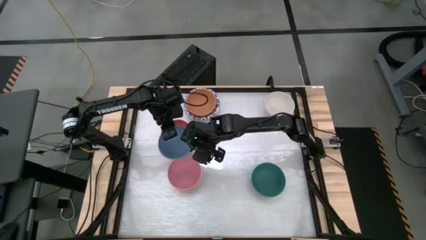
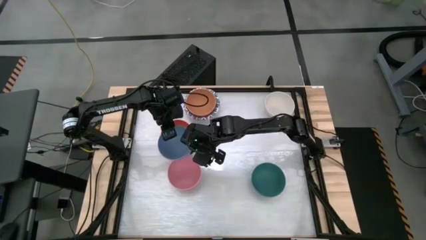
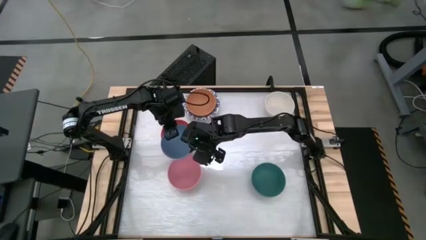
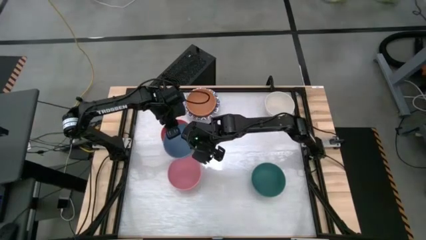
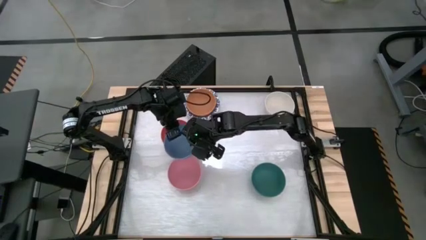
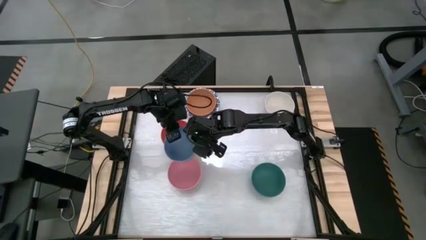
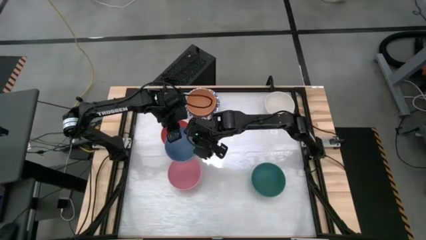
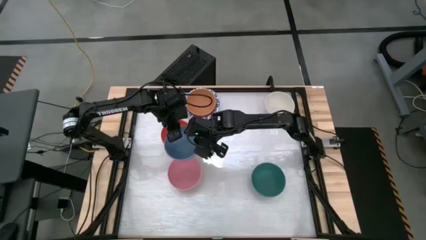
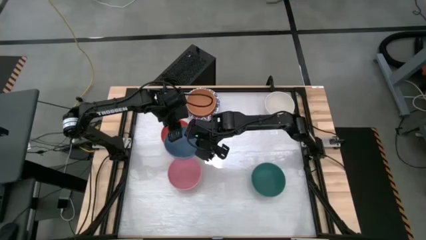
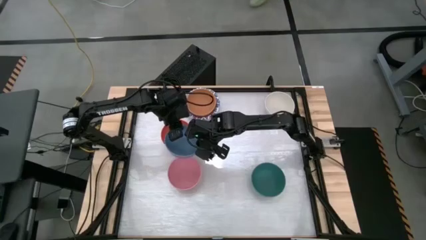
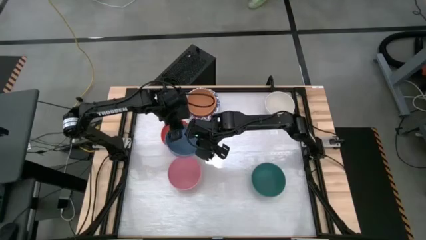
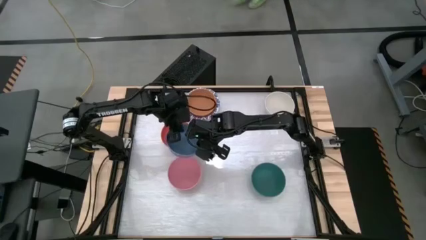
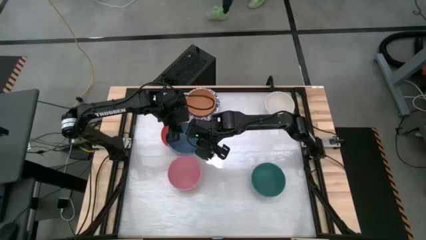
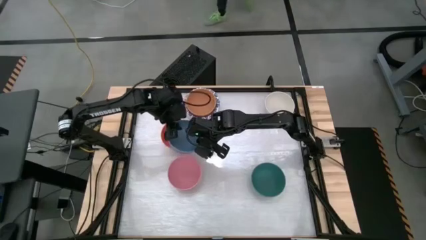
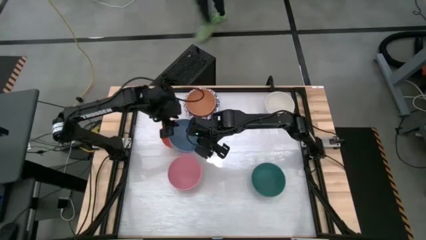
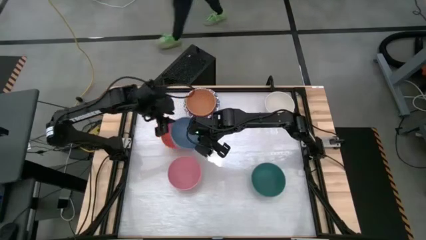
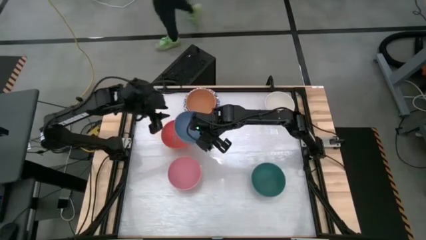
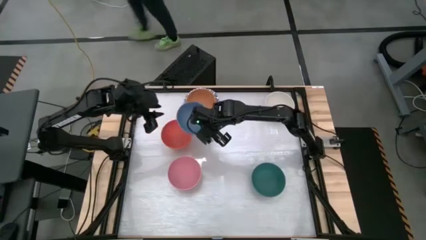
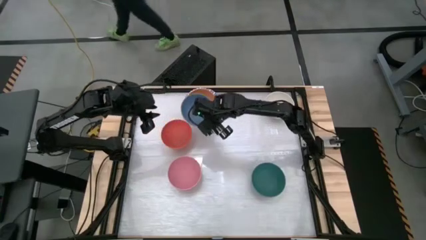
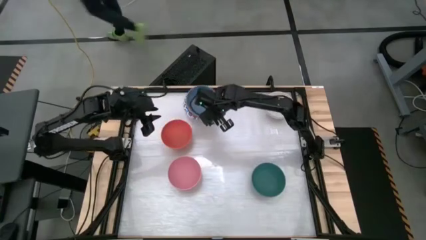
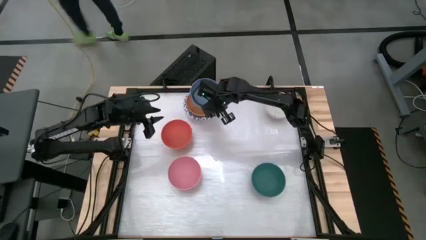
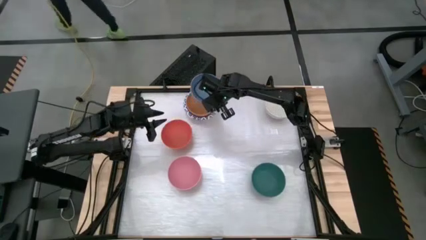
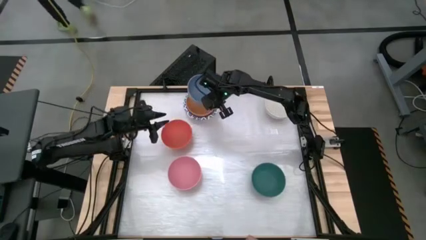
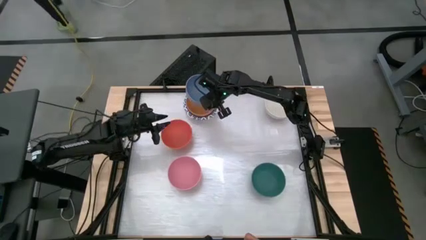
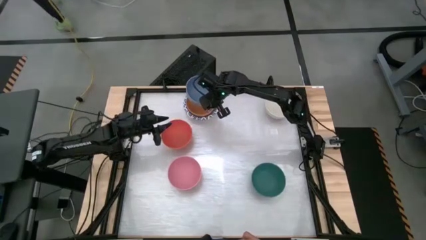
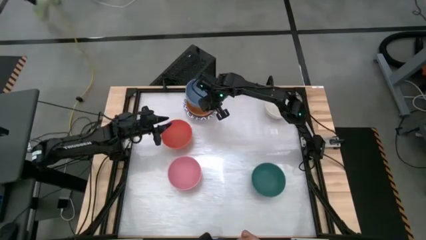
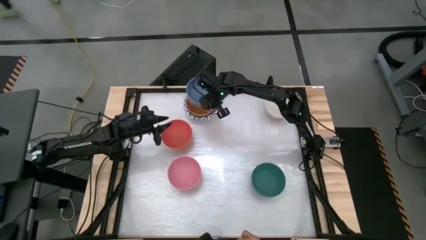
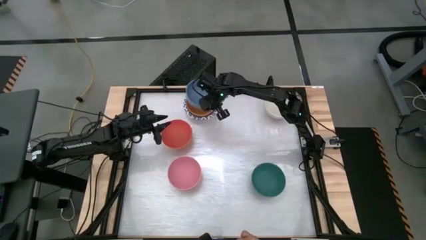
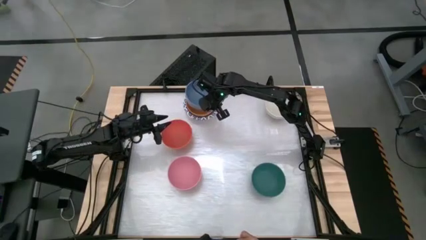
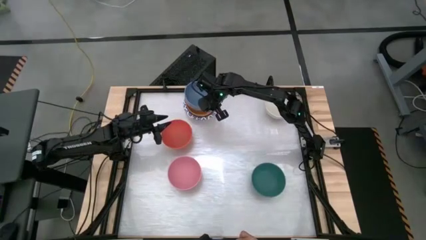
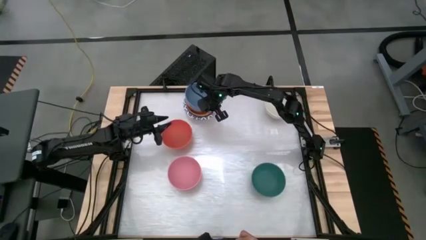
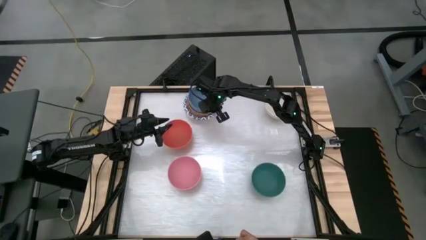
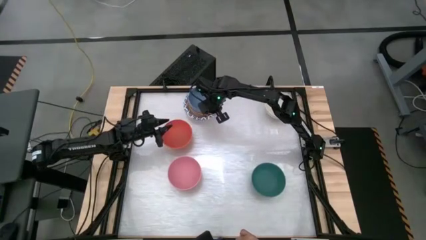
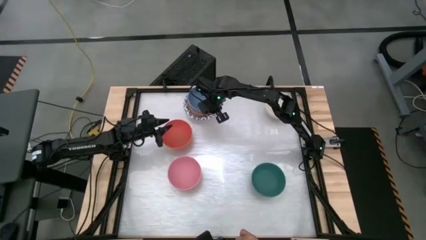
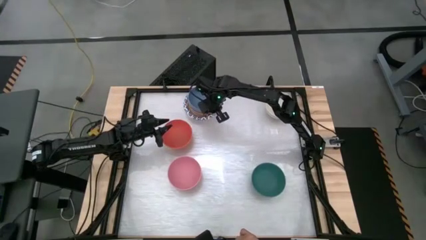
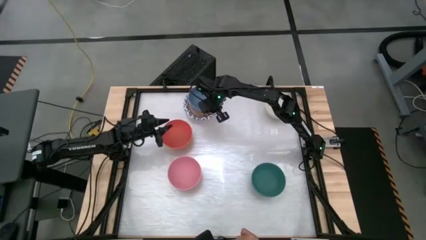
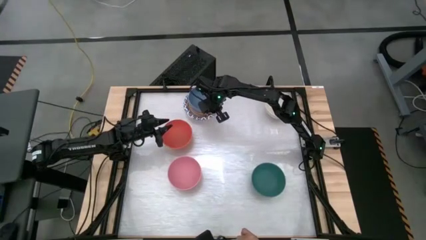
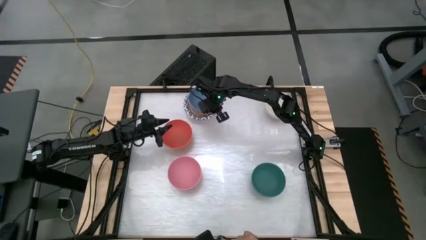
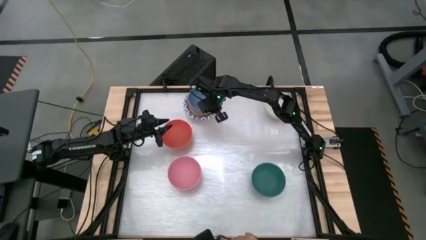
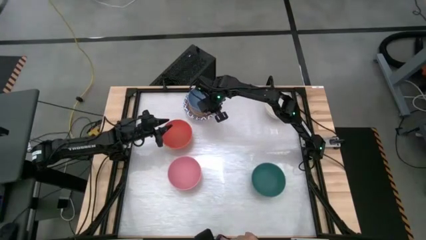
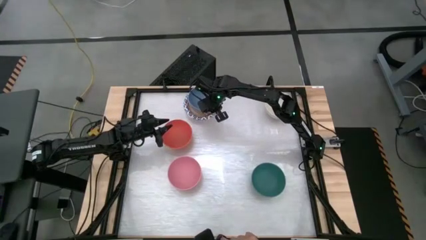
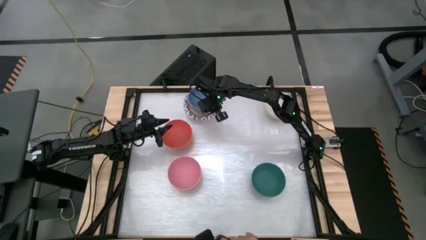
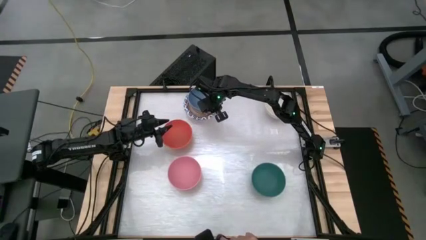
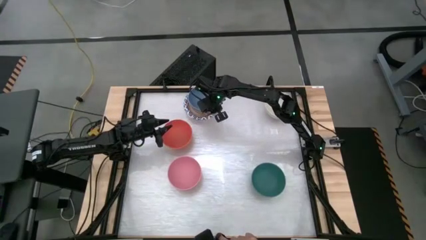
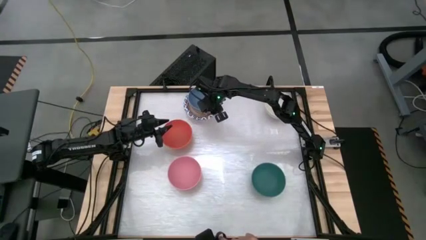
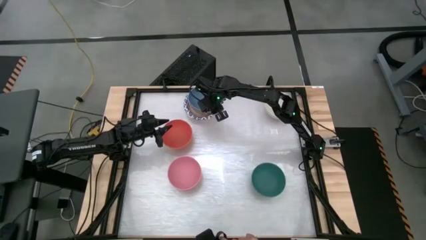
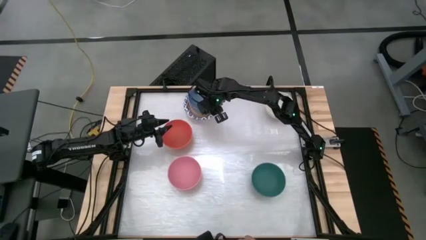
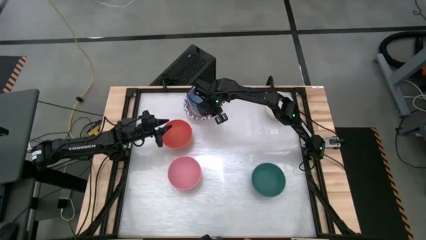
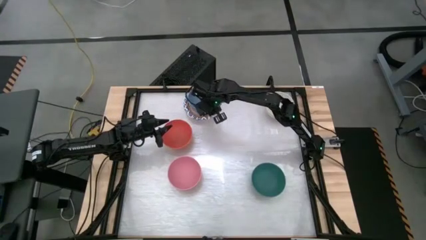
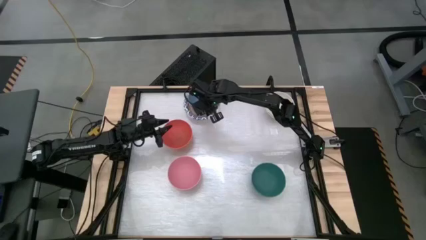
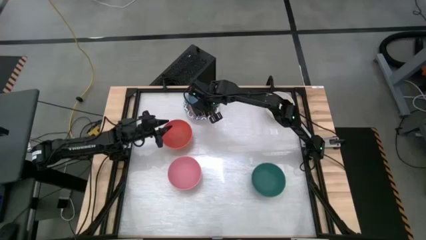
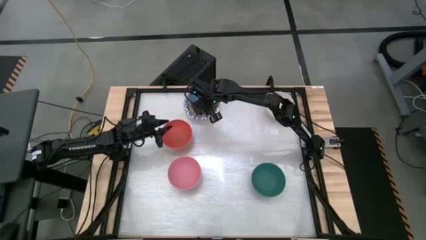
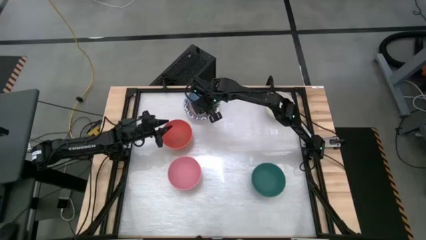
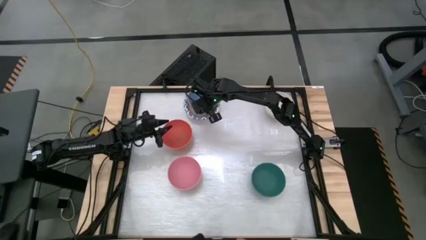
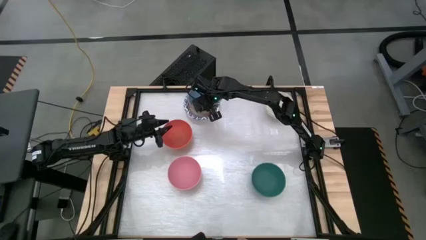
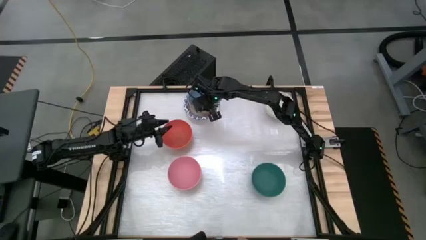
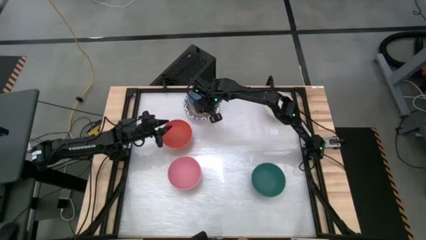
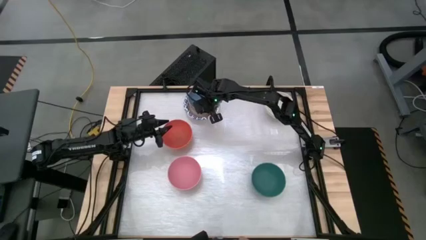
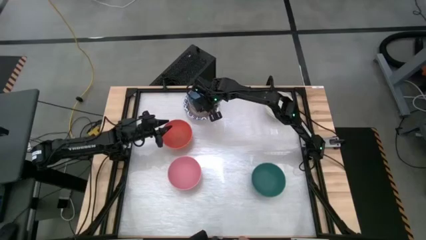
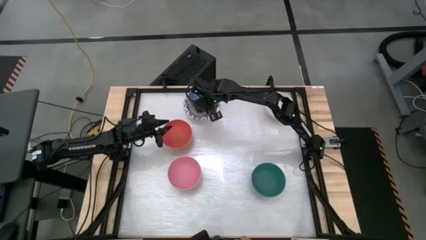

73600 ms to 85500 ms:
Stack the blue bowl onto the stack of bowls
